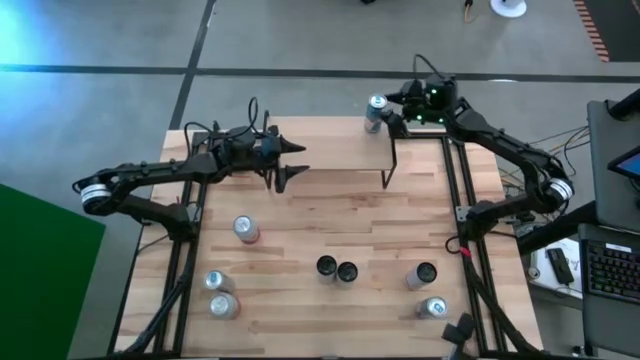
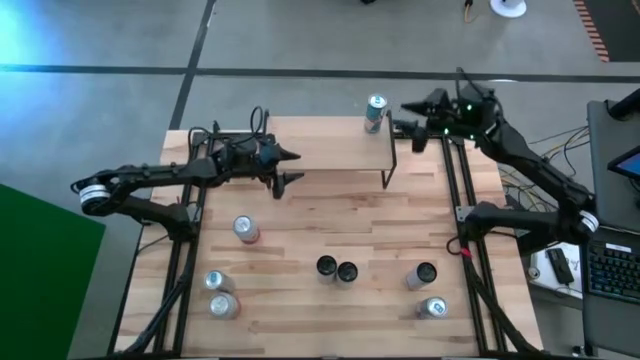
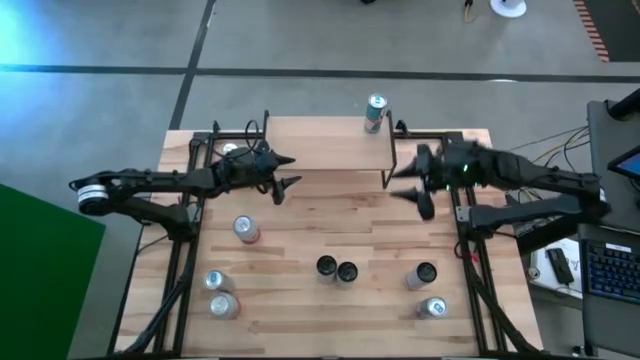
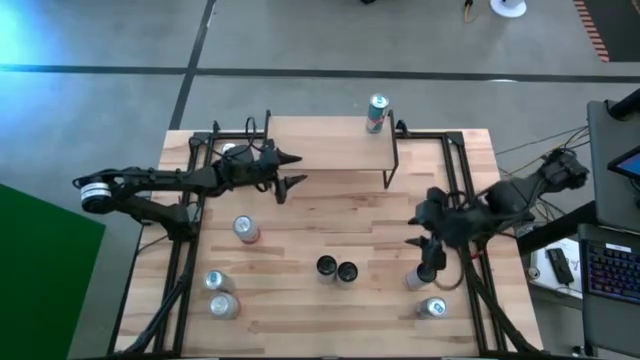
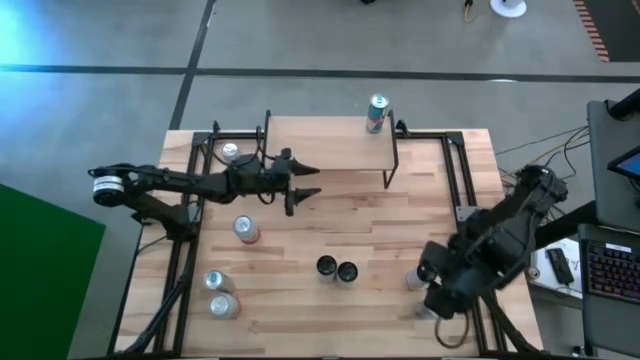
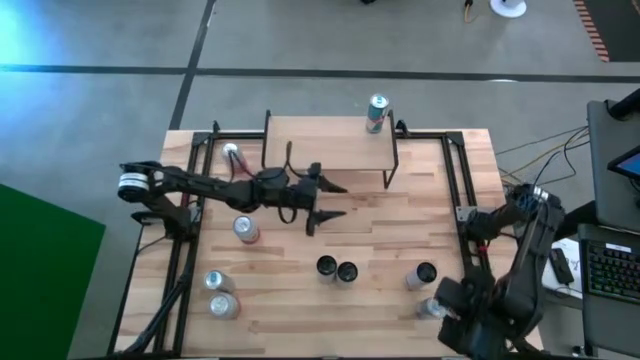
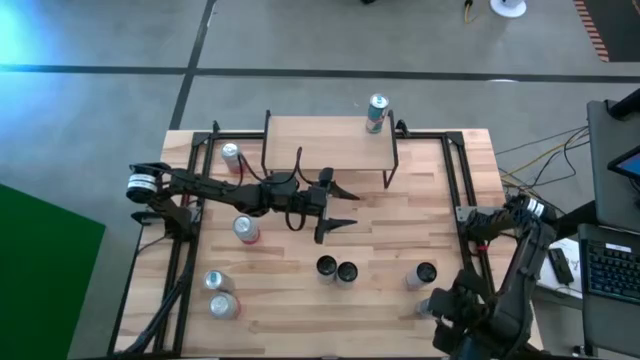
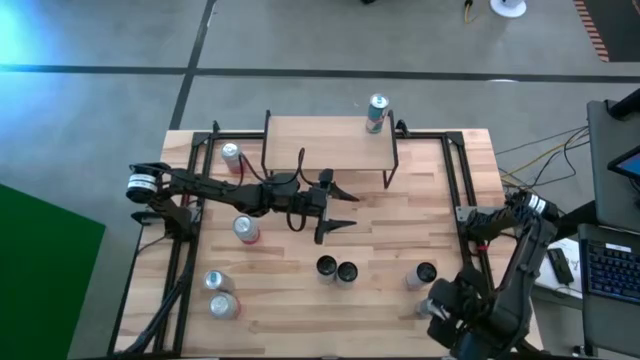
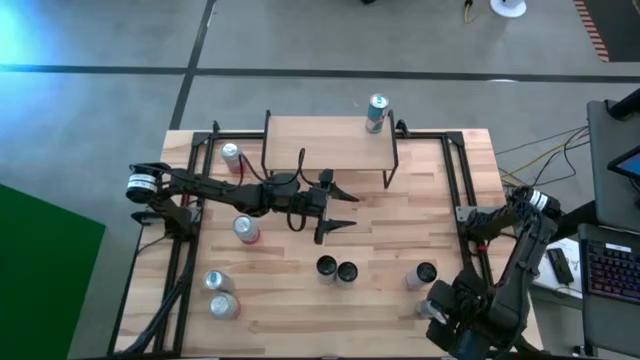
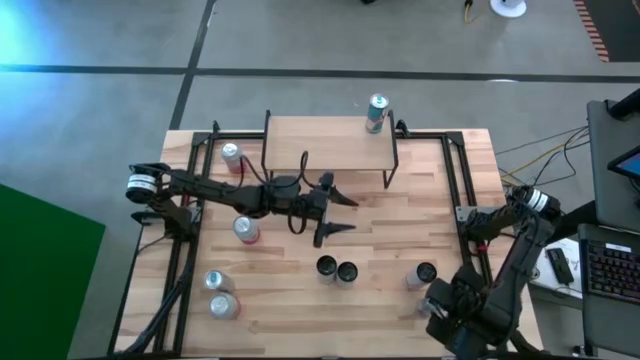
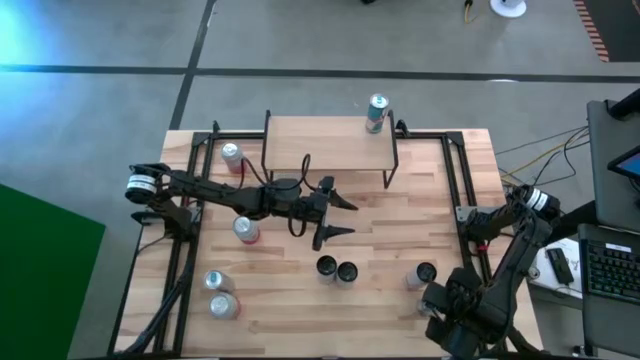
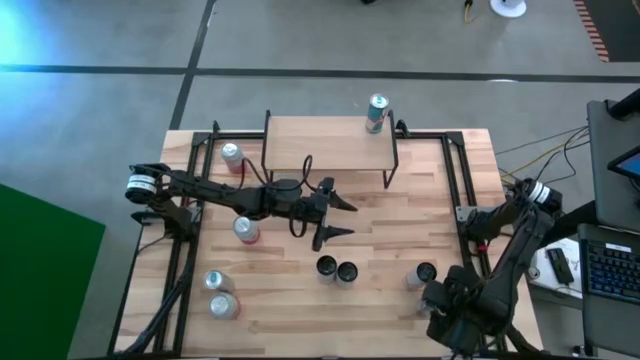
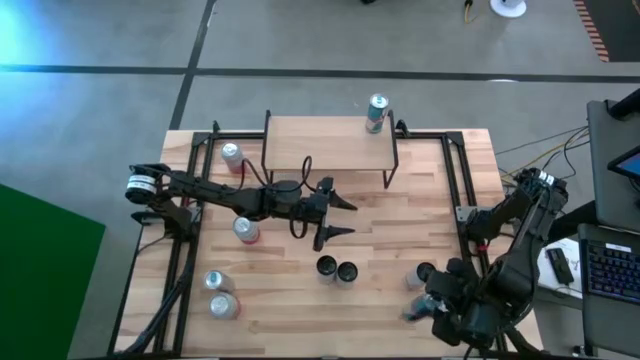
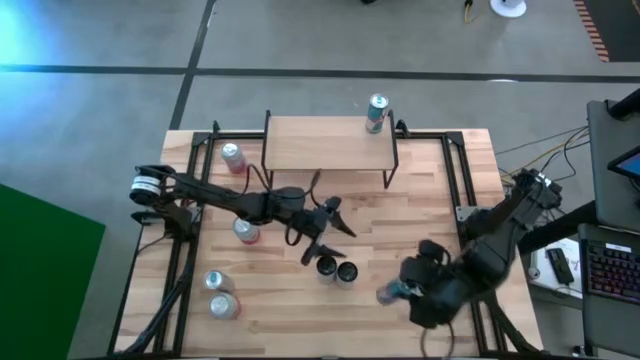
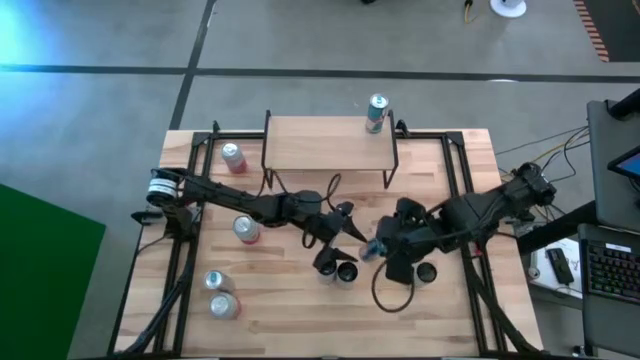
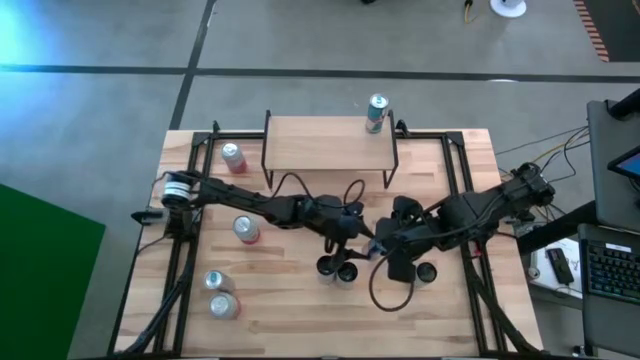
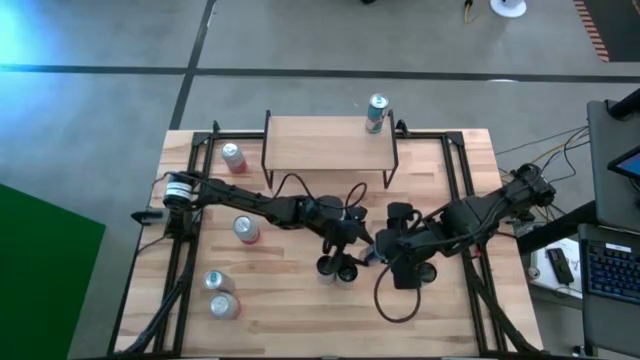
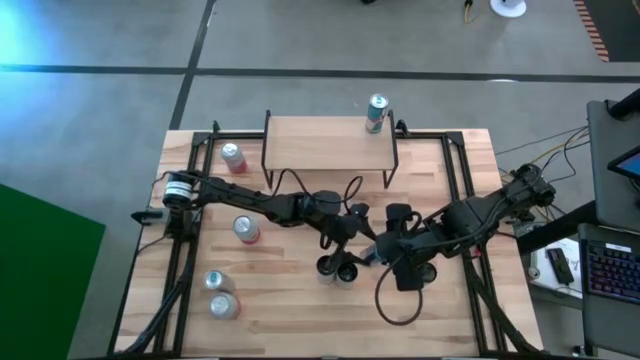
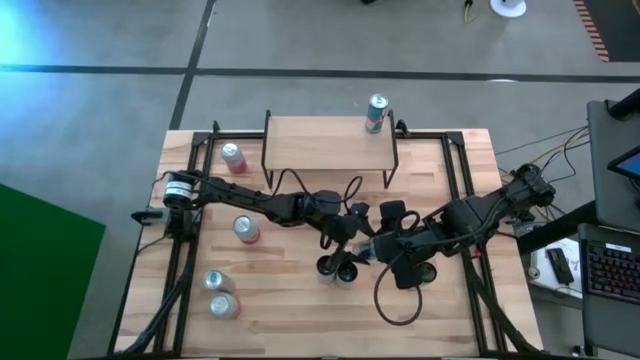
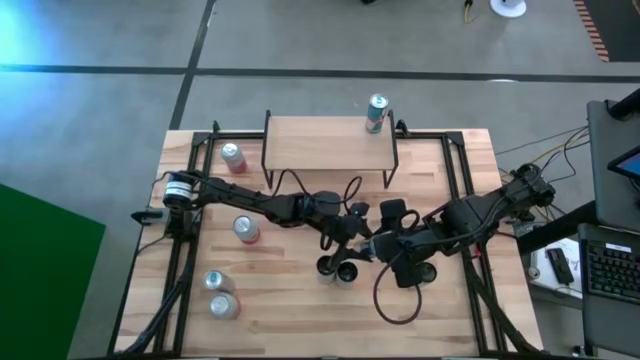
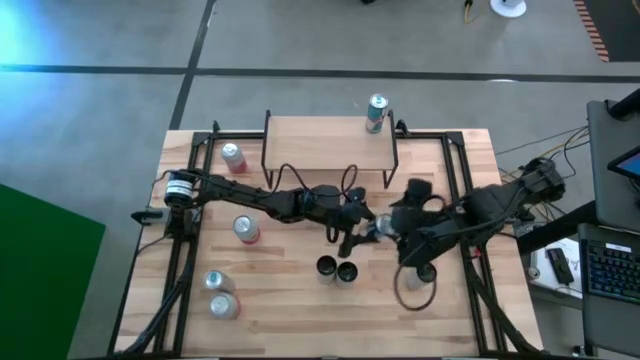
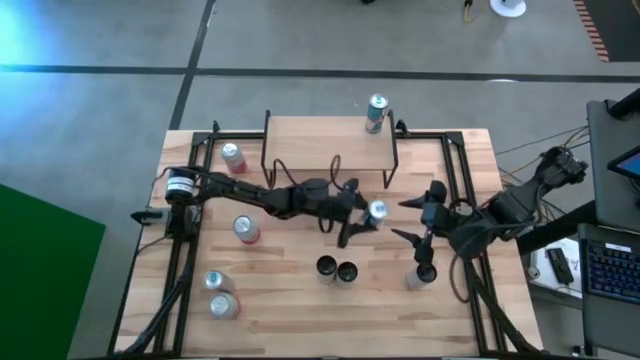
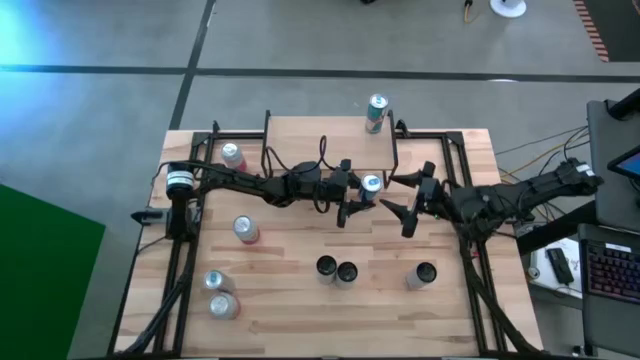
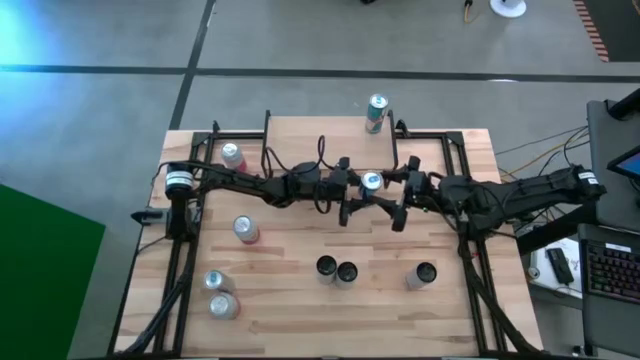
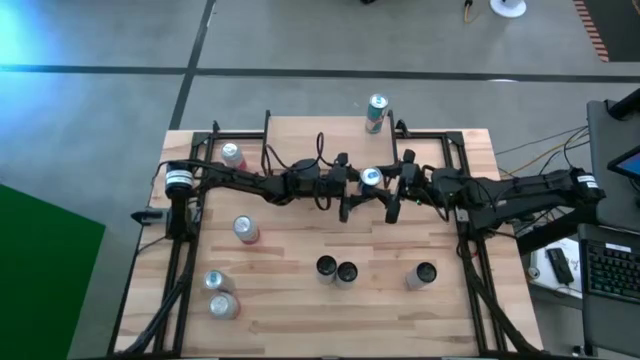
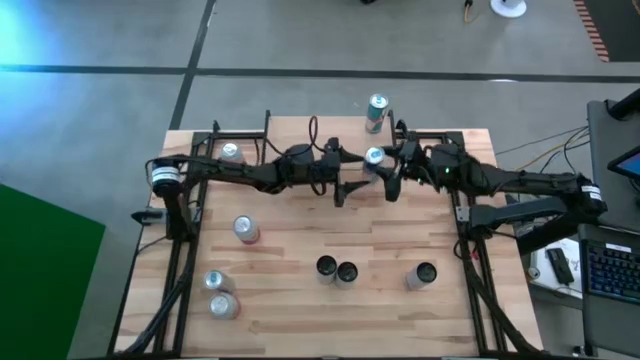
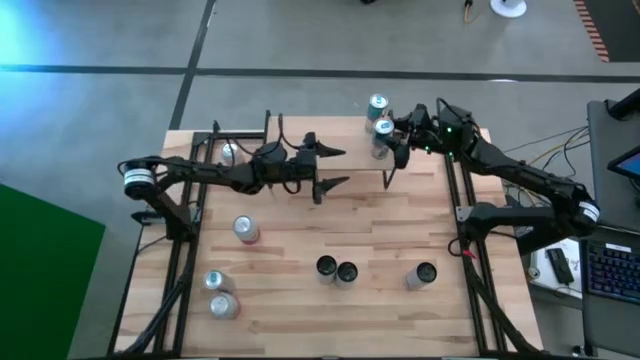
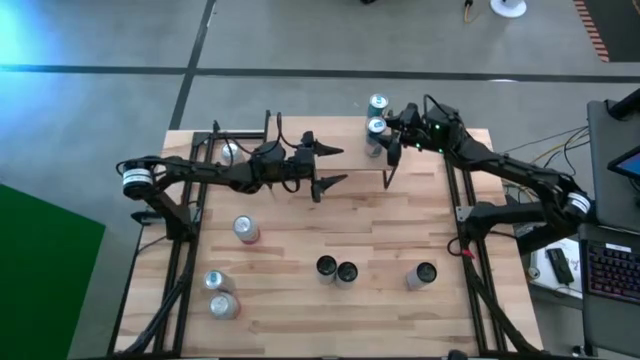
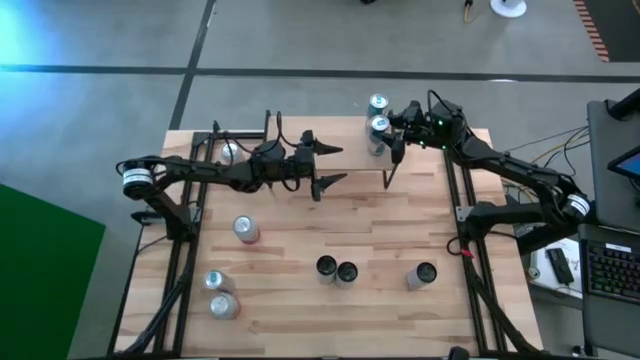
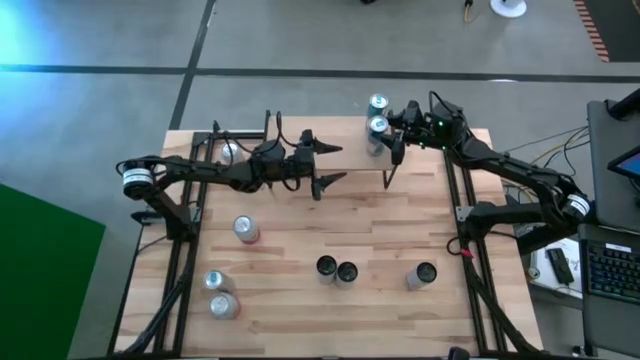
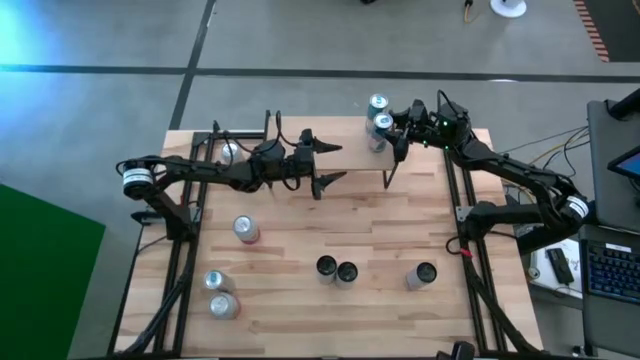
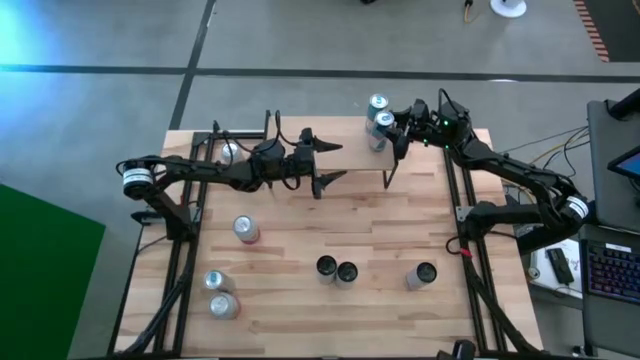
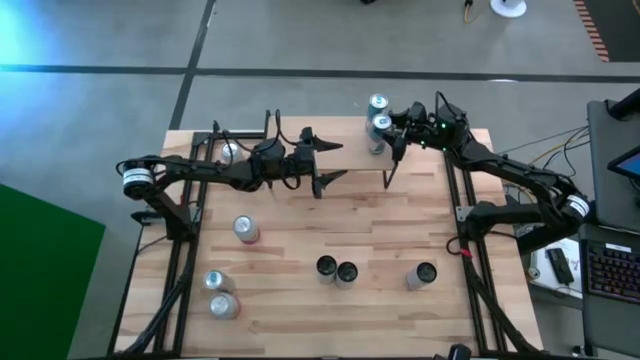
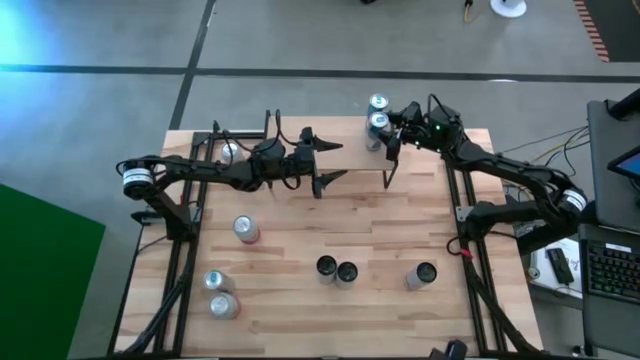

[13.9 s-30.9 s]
Task: Place canned beverage on shelf
Put the right blue soda can on the shelf aligned with the other blue soda can

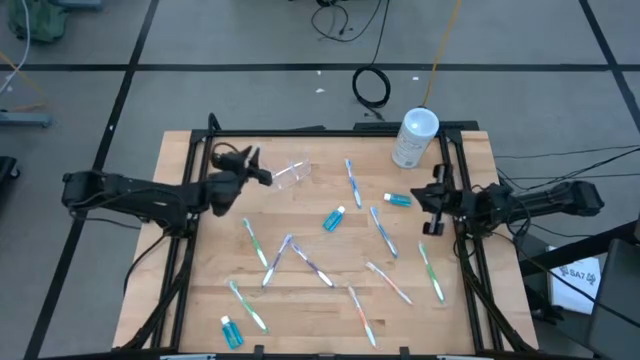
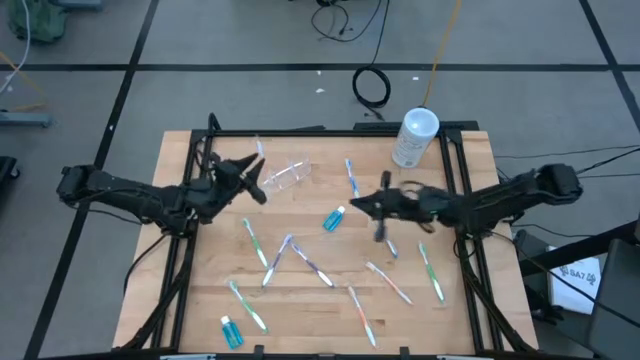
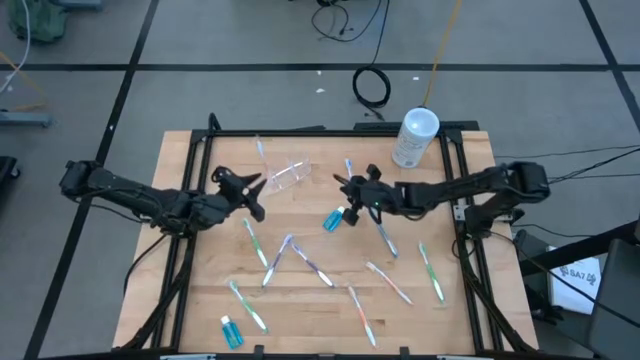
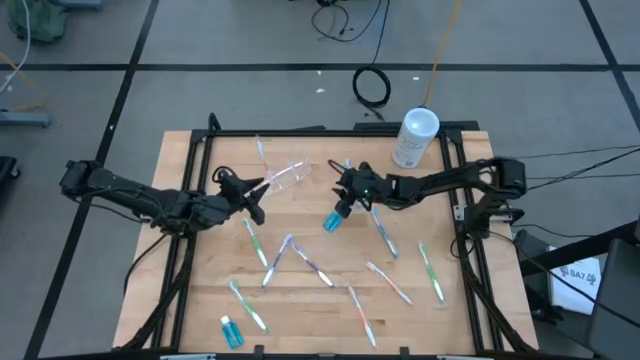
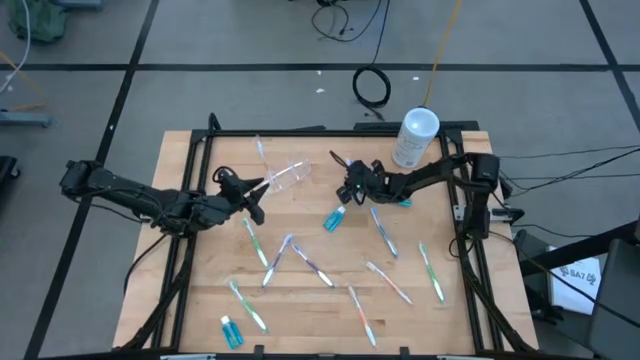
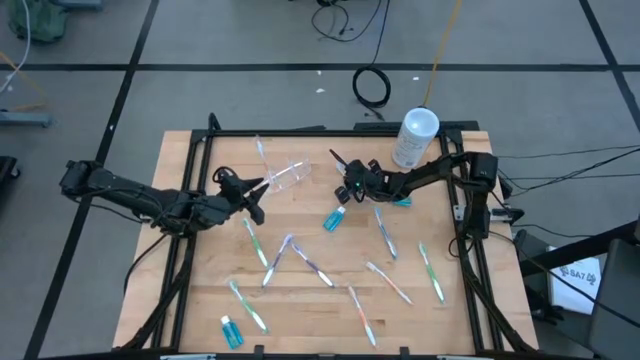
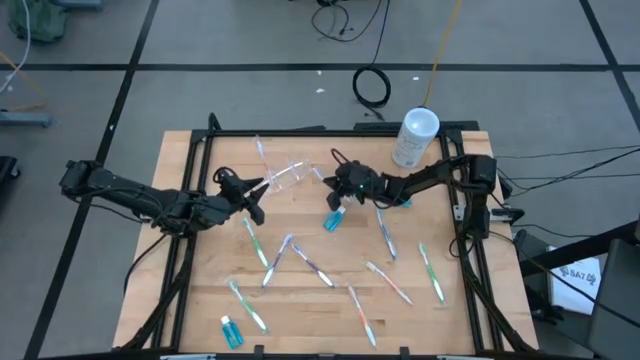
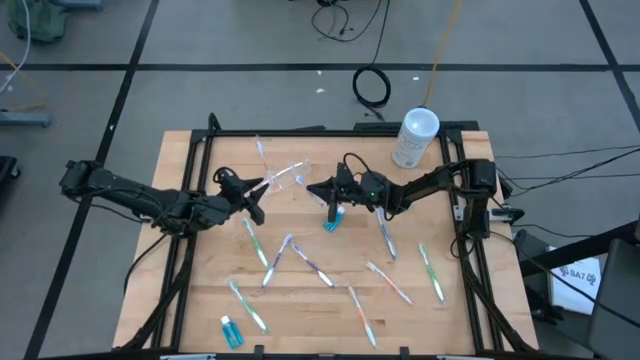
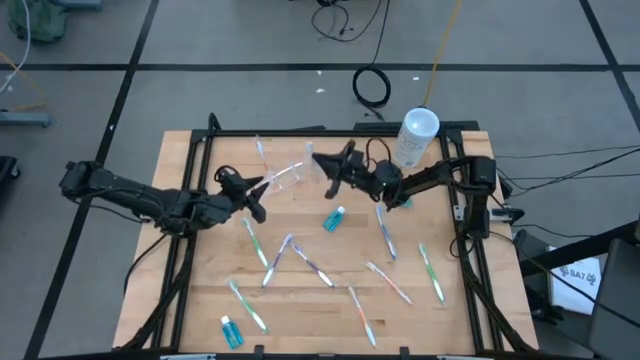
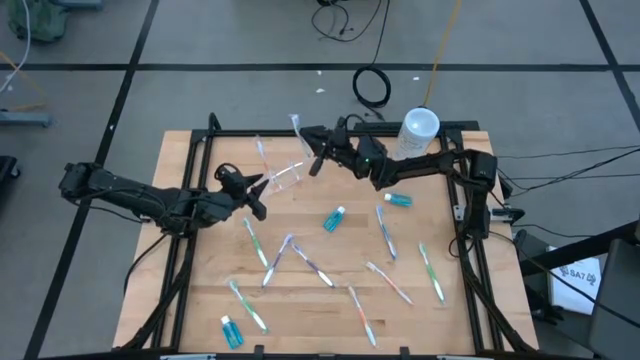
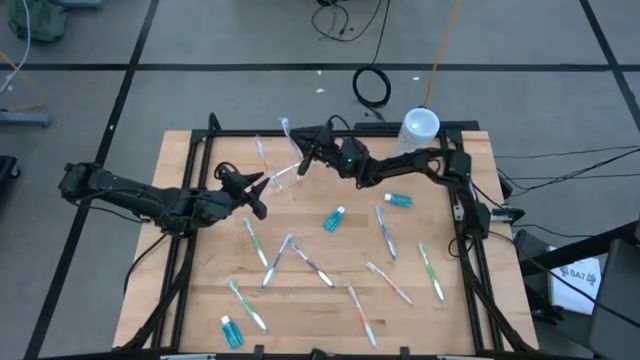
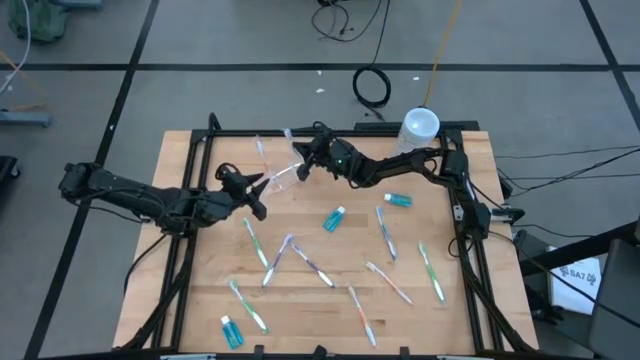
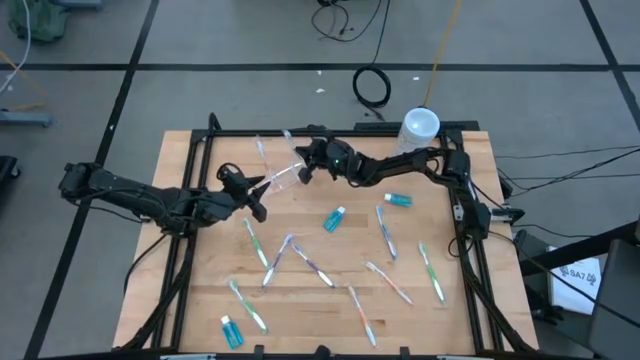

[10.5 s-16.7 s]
Task: Pick & Place toothbrushing station
Put the blue toothbrush into the transparent organizer
